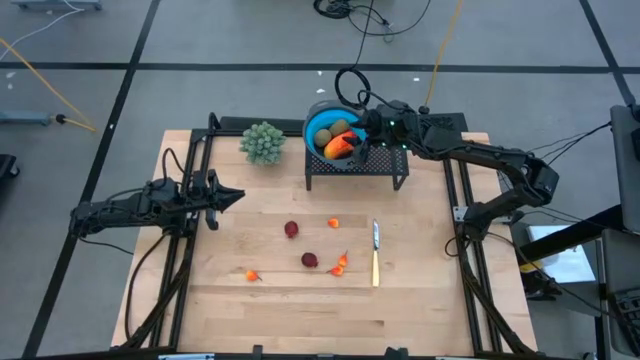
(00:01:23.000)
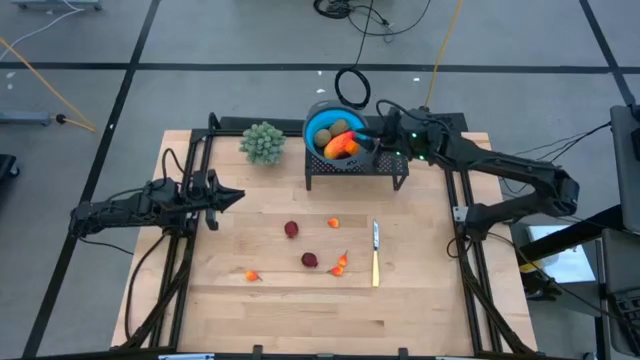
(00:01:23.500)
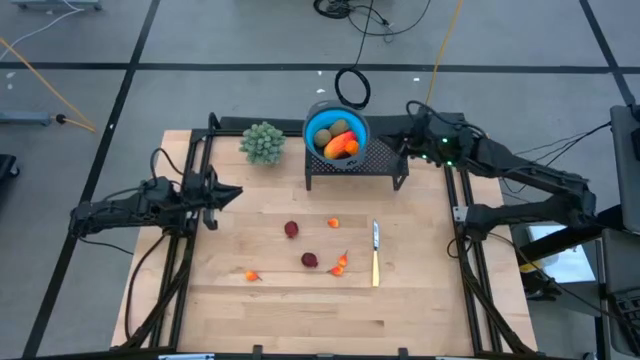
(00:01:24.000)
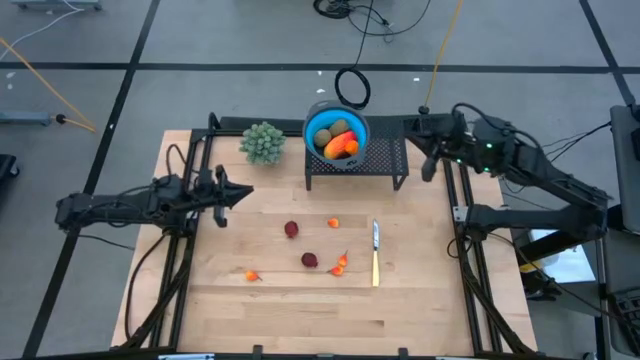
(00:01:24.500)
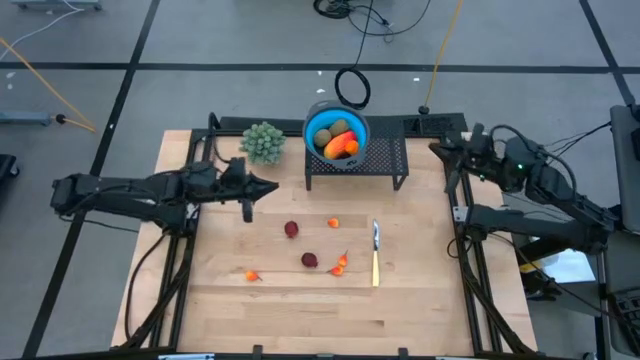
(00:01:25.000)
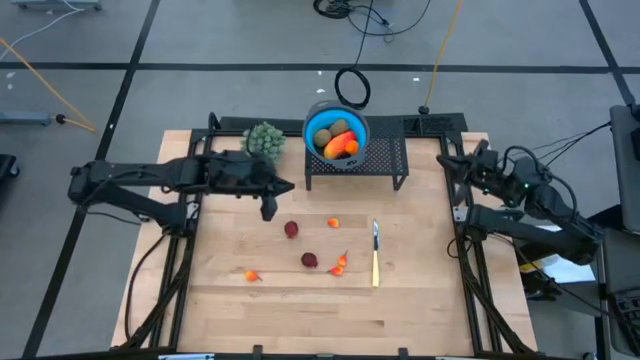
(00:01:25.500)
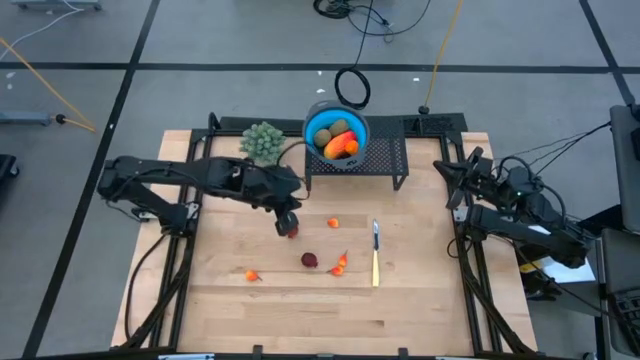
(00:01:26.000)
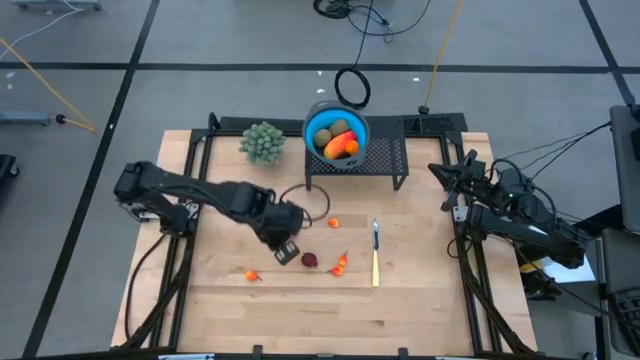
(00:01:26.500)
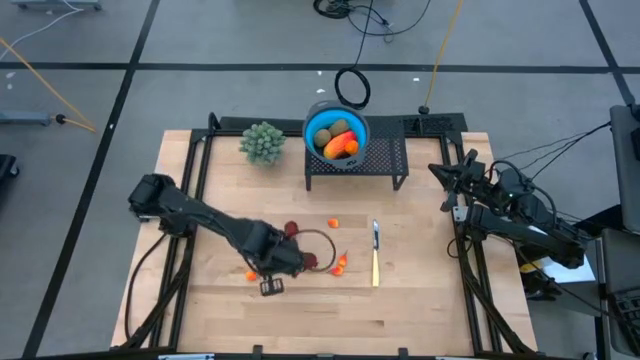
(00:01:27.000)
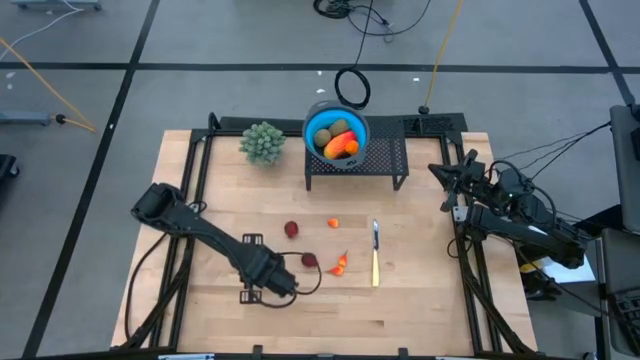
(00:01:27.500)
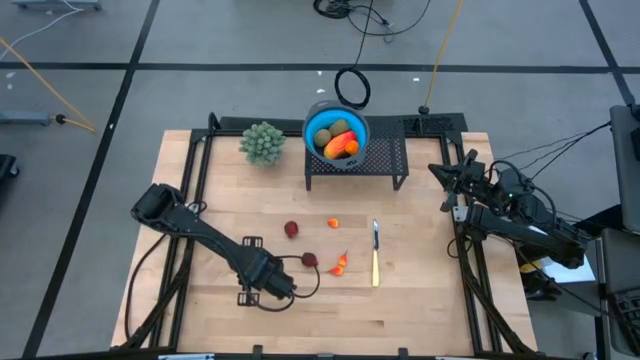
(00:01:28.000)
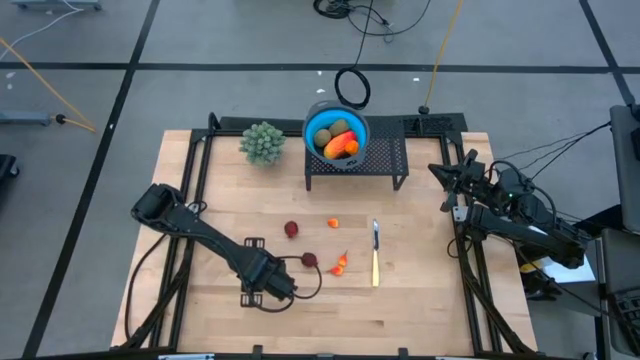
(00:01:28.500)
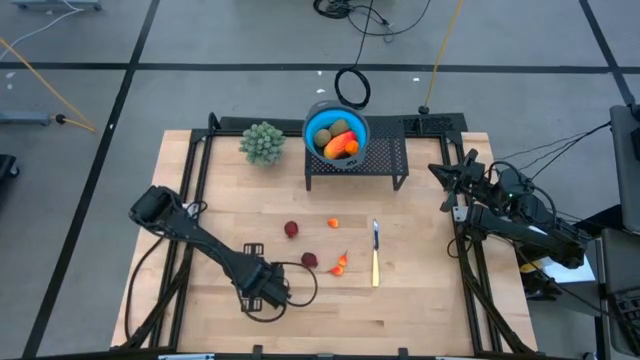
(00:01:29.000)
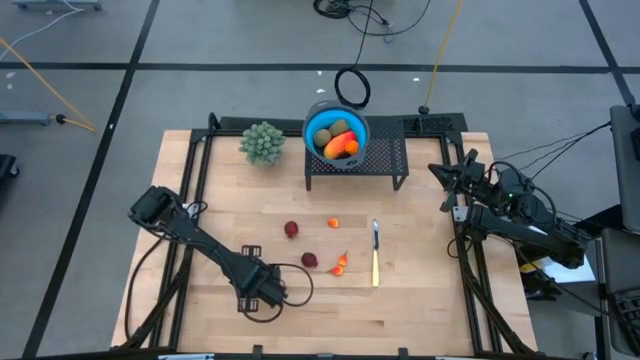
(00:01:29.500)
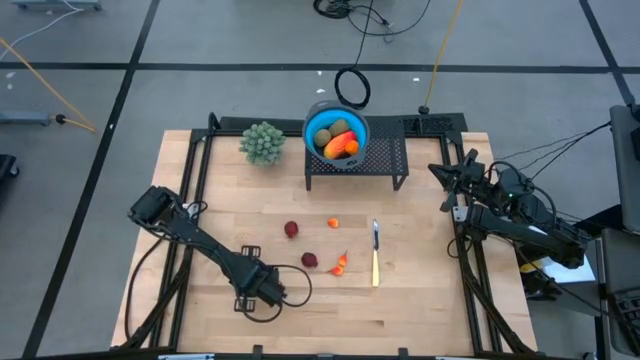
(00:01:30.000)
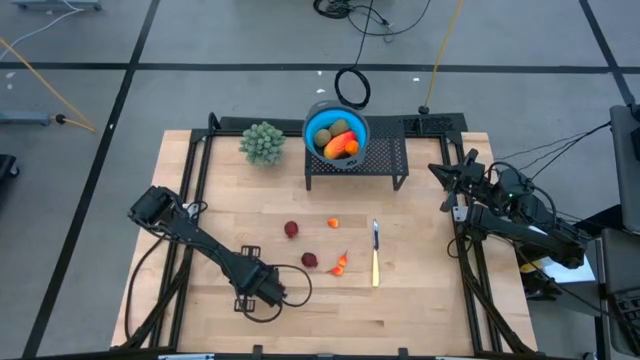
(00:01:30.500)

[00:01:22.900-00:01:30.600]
Task: Pick & Place Fruit
Put the orange peach into the blue strainer bowl on the shelf

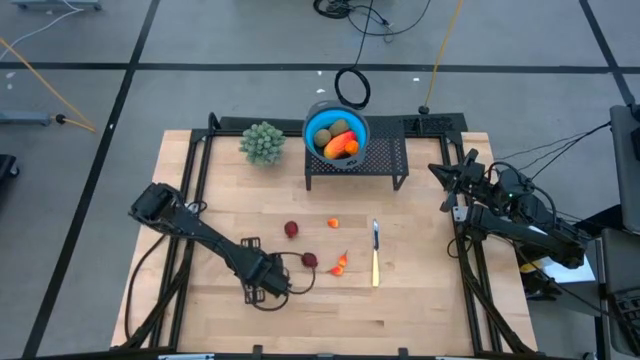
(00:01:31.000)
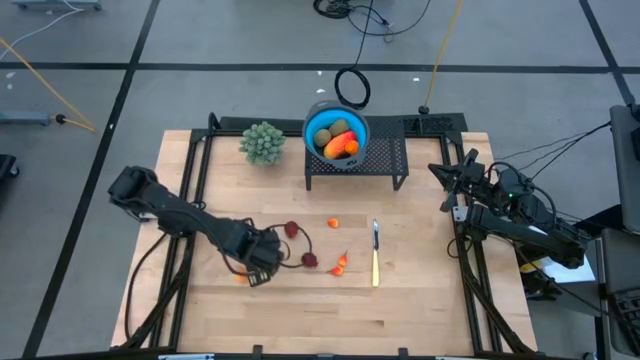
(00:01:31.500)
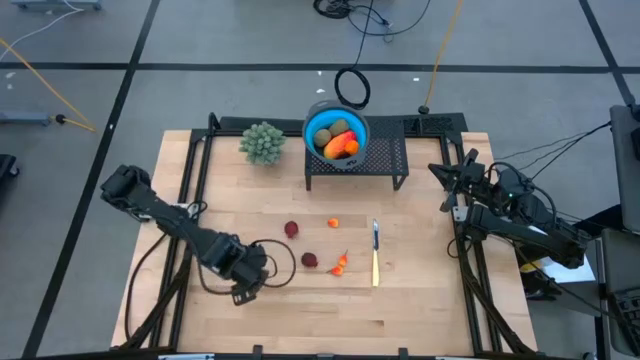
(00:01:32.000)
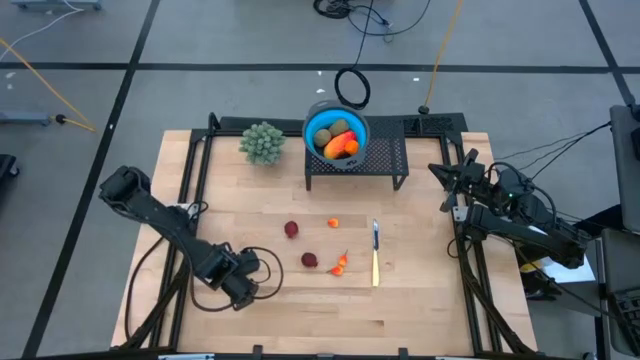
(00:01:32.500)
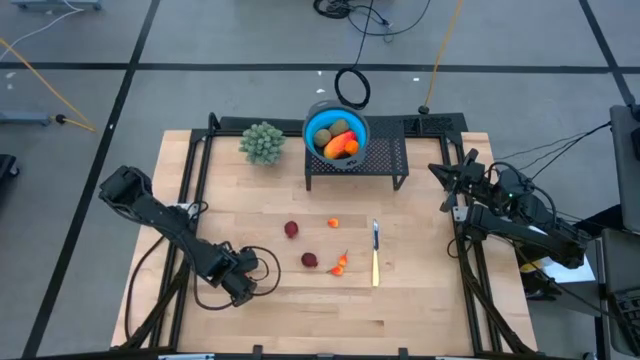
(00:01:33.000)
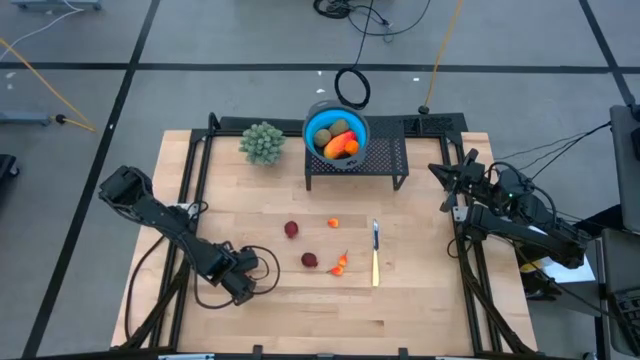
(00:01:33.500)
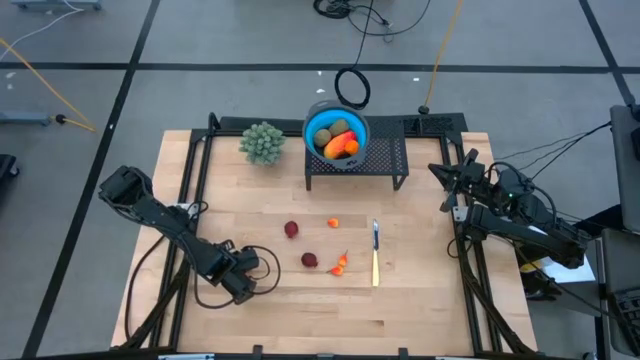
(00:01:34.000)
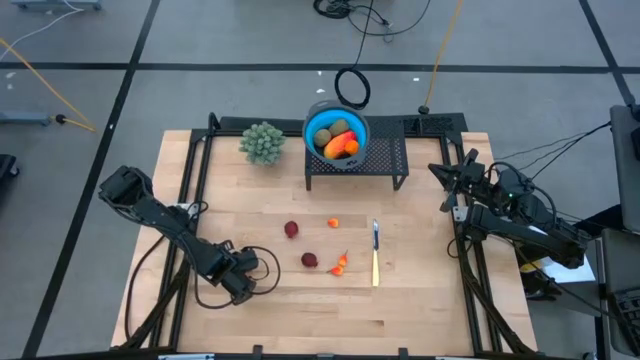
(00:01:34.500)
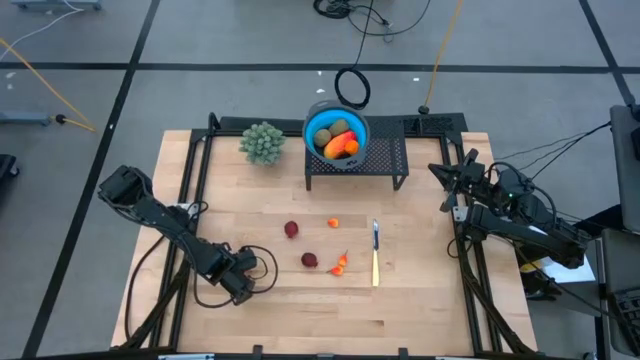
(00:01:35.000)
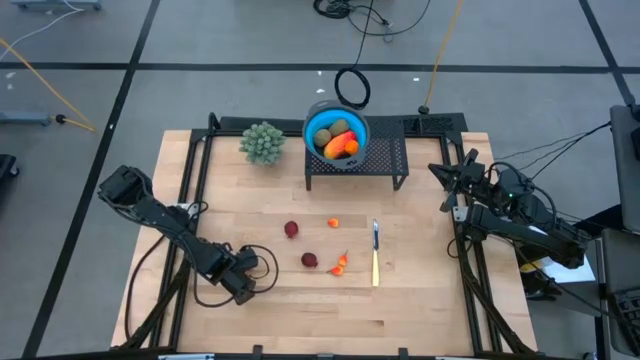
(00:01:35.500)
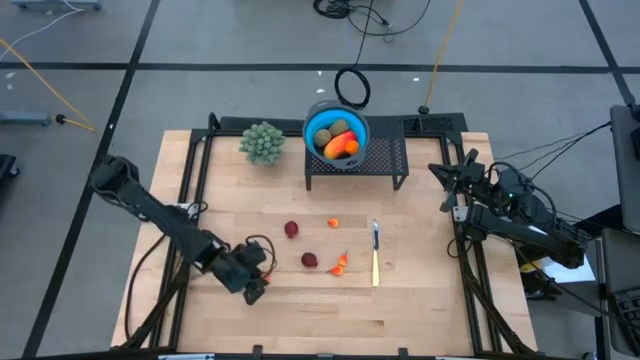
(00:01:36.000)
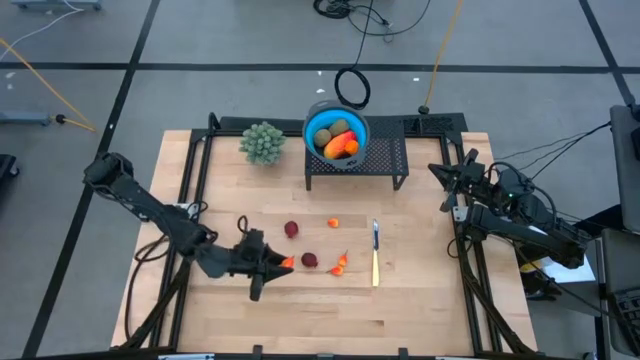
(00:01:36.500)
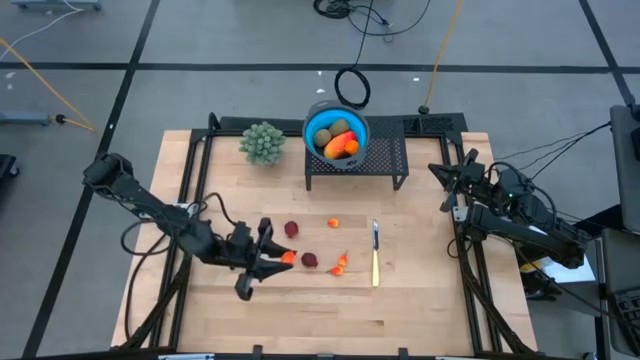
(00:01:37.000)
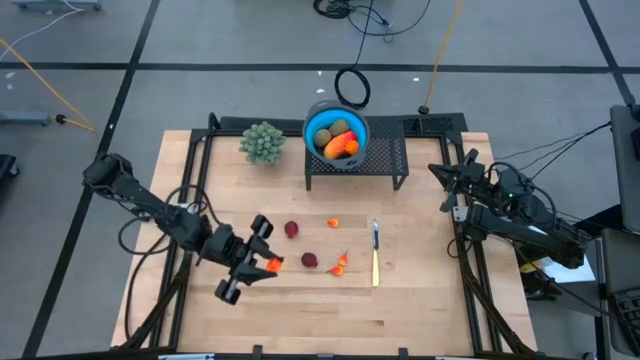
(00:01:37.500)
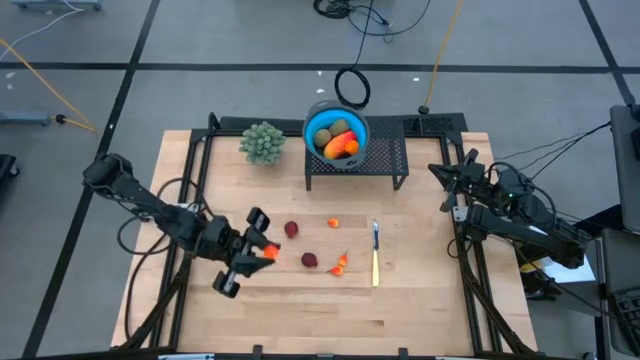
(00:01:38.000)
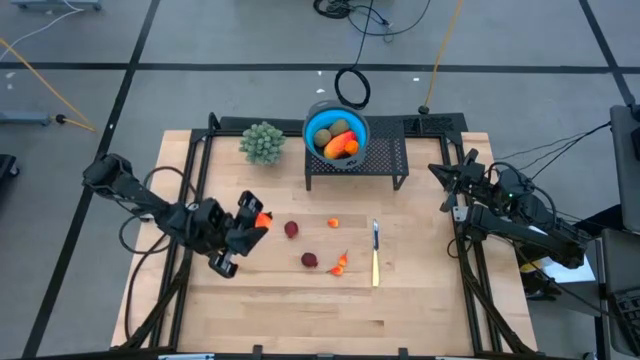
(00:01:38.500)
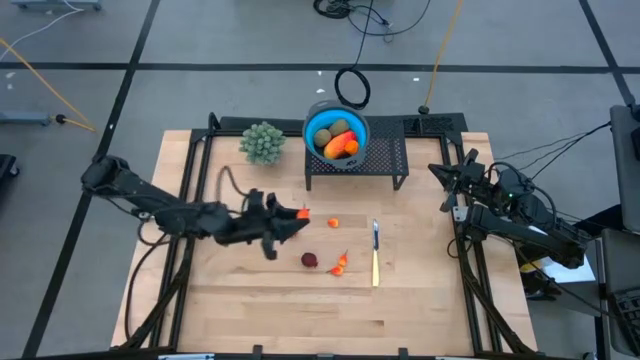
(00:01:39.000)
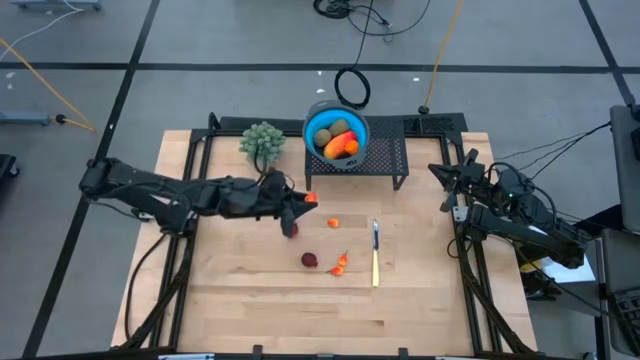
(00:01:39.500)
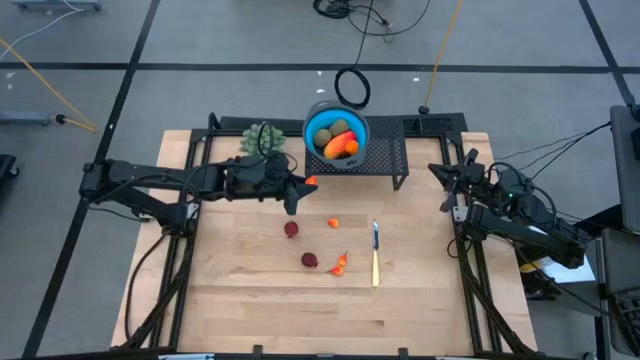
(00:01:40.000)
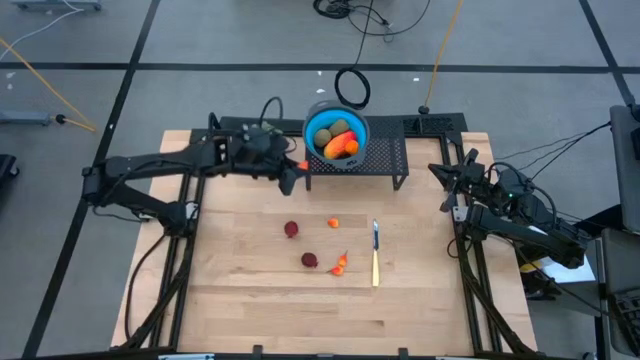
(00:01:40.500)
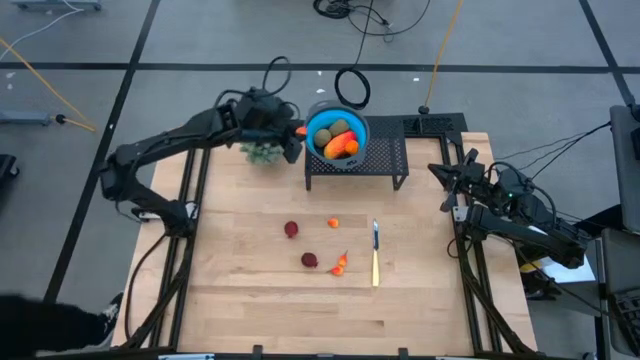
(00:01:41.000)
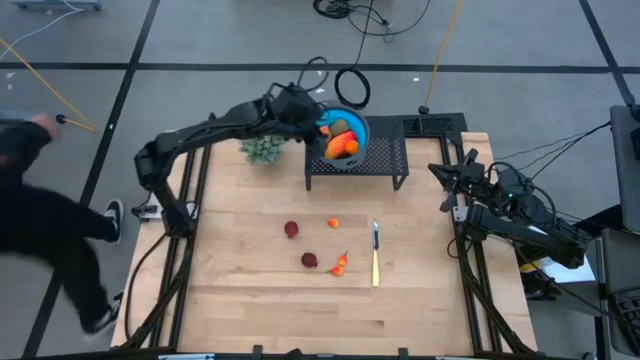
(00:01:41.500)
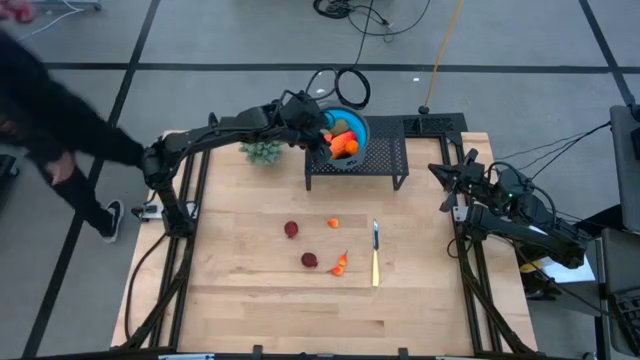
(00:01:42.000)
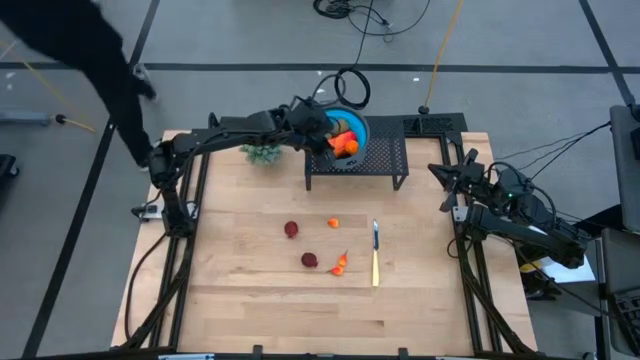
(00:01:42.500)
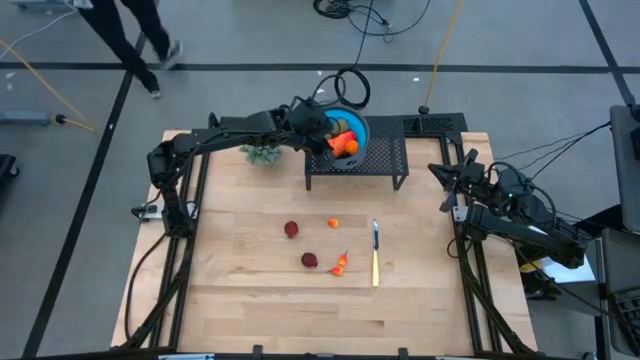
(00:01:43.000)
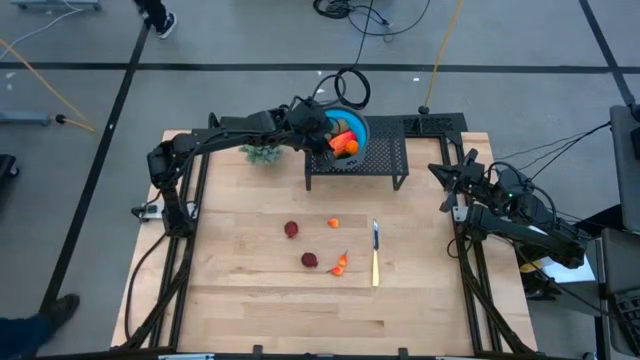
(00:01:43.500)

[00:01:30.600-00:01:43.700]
Put the orange peach into the blue strainer bowl on the shelf
